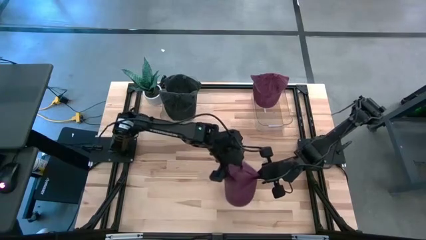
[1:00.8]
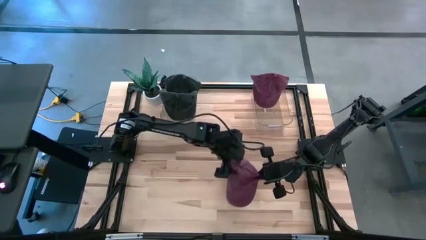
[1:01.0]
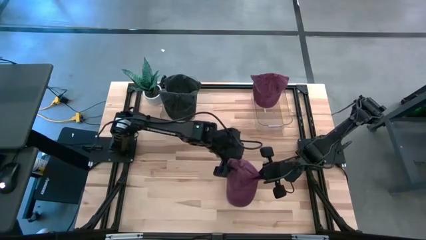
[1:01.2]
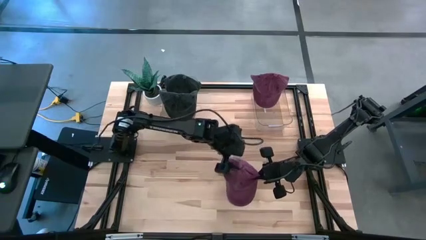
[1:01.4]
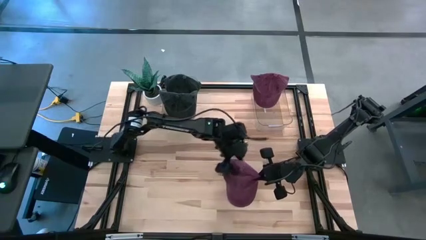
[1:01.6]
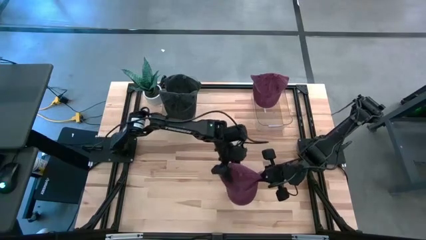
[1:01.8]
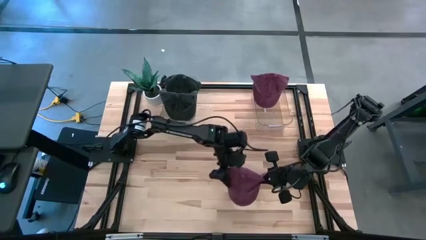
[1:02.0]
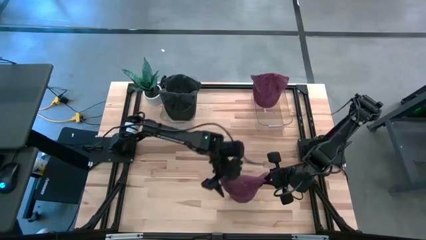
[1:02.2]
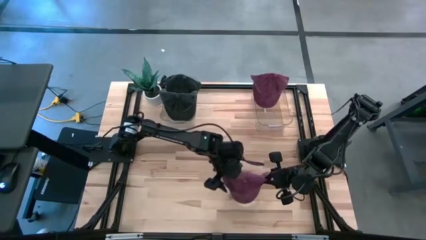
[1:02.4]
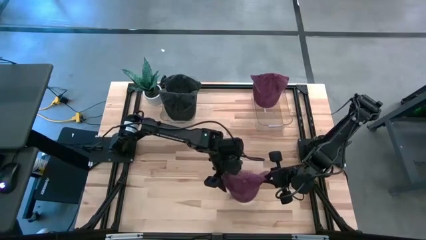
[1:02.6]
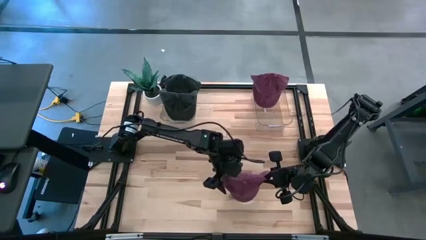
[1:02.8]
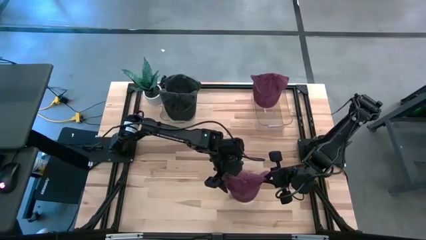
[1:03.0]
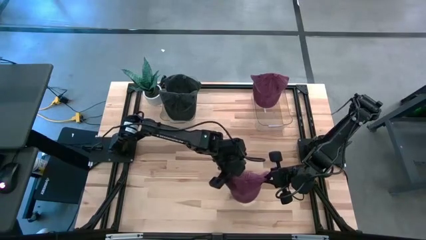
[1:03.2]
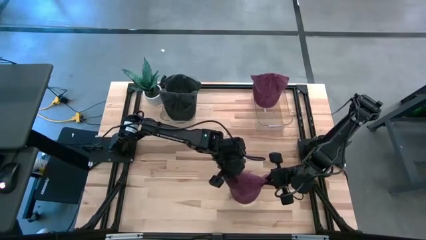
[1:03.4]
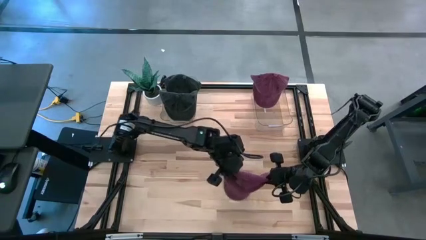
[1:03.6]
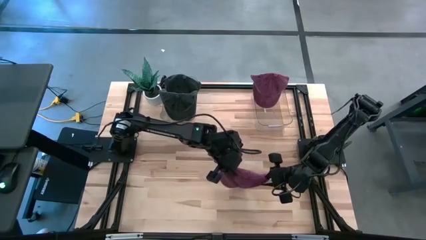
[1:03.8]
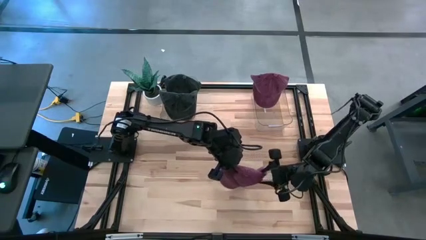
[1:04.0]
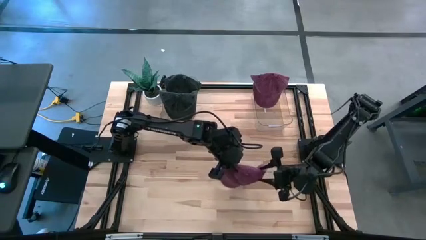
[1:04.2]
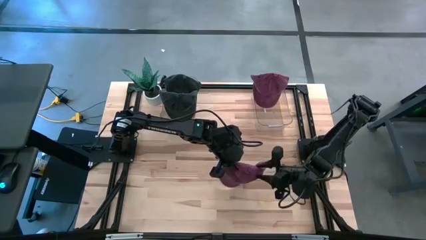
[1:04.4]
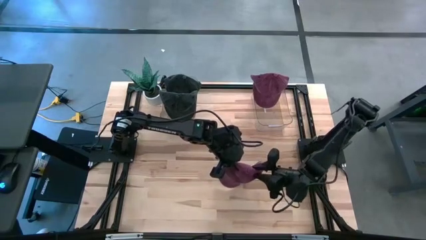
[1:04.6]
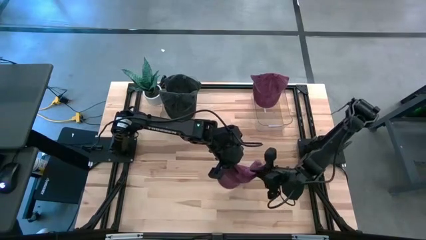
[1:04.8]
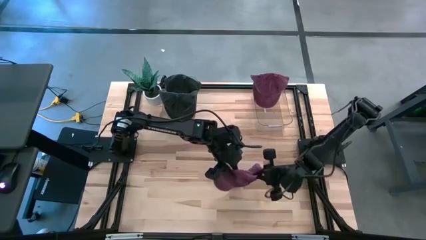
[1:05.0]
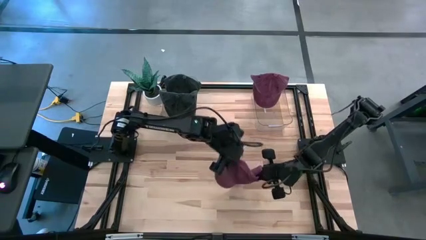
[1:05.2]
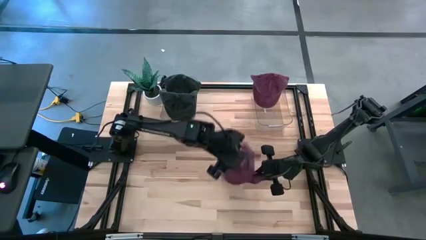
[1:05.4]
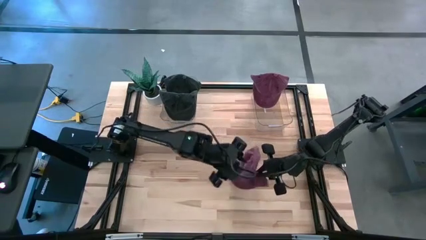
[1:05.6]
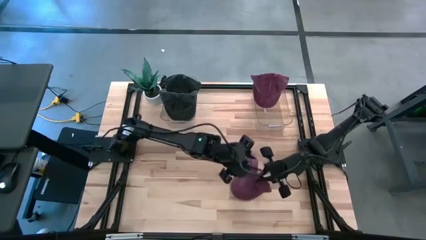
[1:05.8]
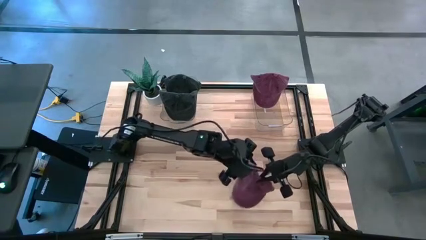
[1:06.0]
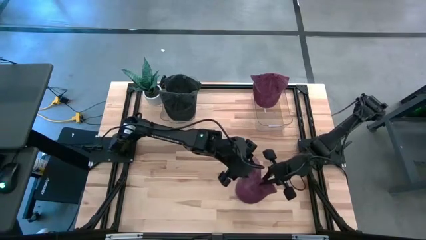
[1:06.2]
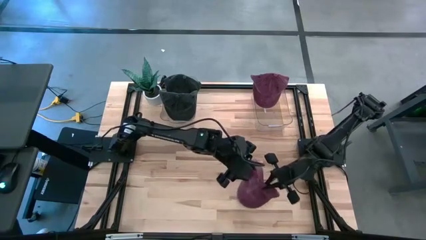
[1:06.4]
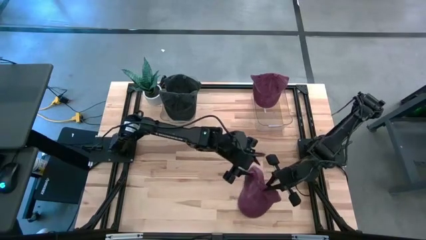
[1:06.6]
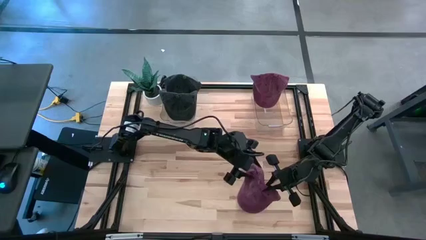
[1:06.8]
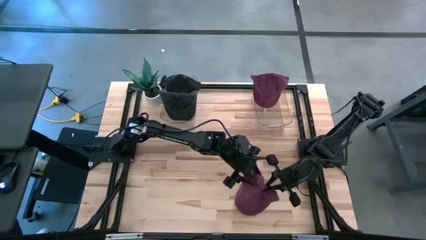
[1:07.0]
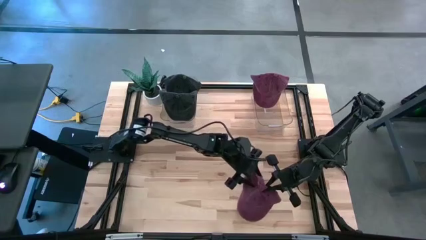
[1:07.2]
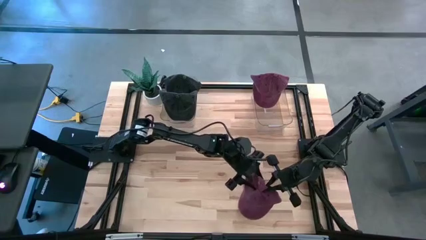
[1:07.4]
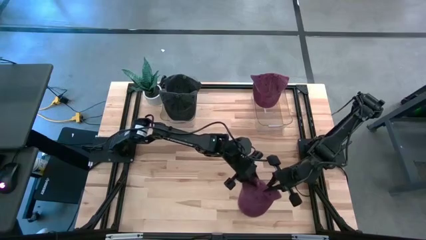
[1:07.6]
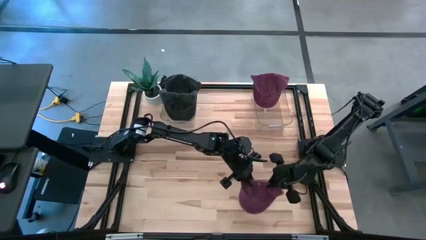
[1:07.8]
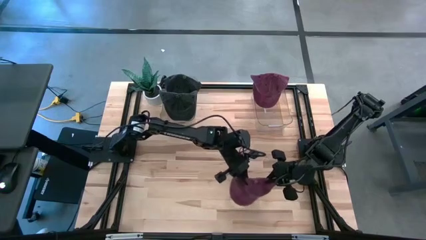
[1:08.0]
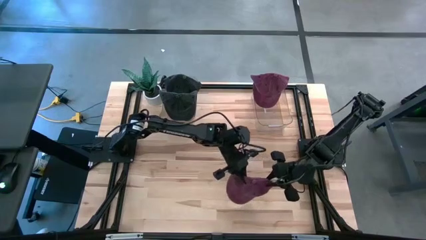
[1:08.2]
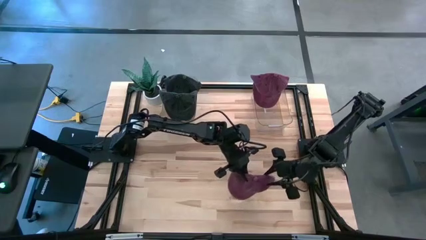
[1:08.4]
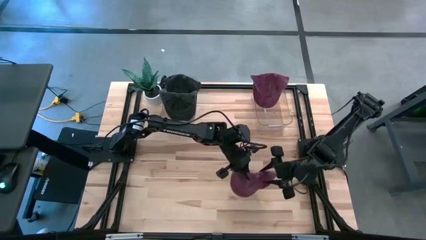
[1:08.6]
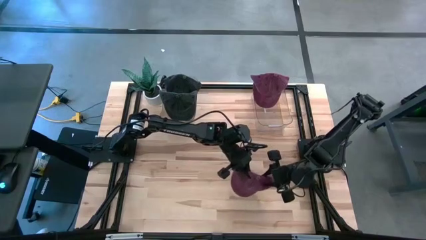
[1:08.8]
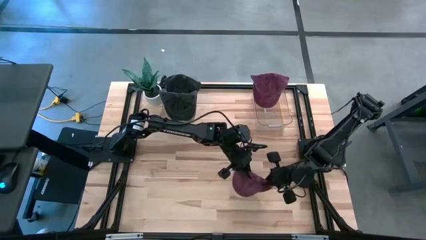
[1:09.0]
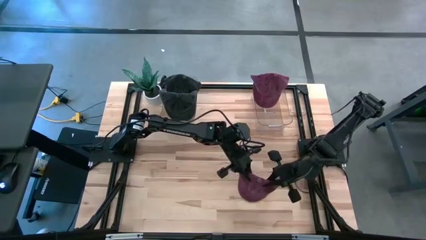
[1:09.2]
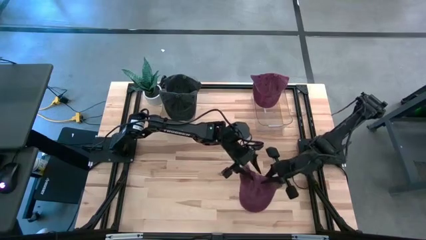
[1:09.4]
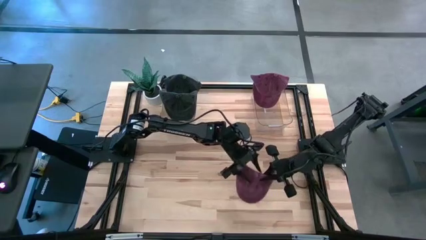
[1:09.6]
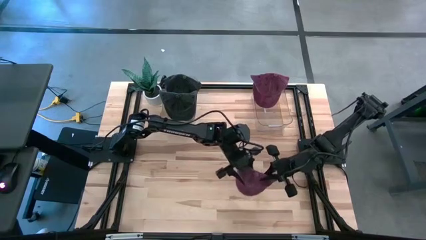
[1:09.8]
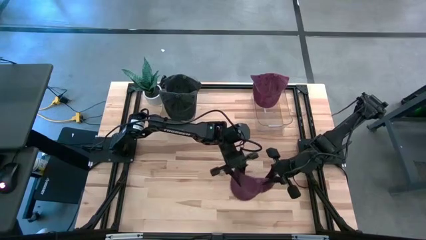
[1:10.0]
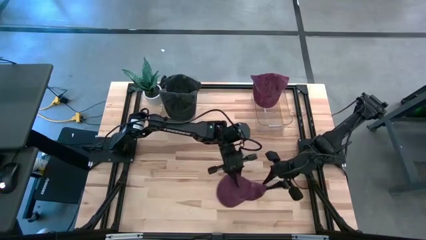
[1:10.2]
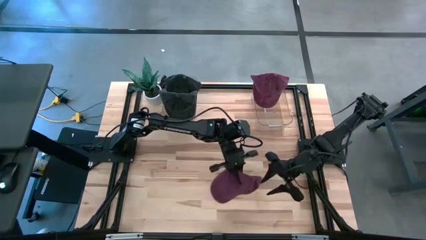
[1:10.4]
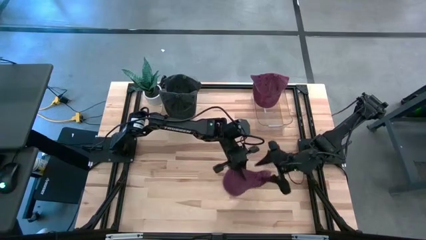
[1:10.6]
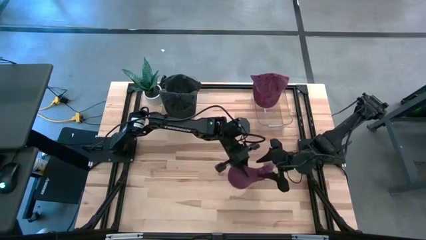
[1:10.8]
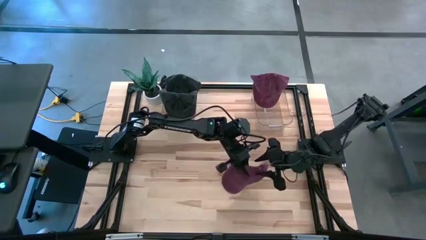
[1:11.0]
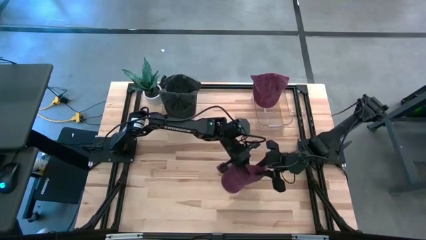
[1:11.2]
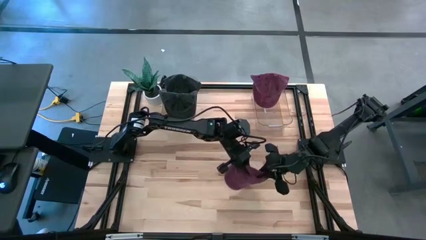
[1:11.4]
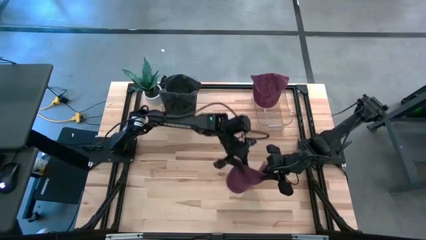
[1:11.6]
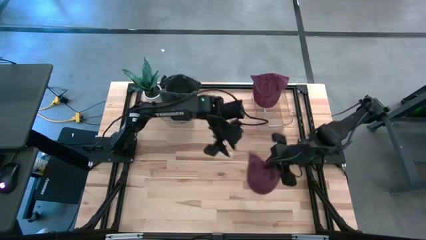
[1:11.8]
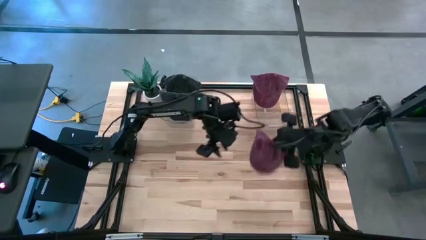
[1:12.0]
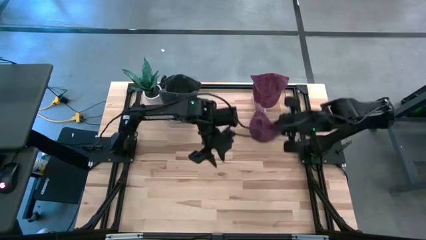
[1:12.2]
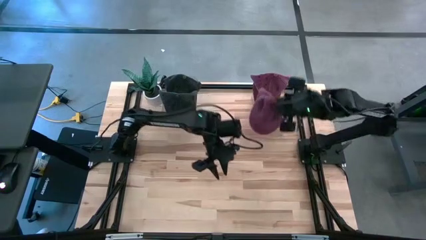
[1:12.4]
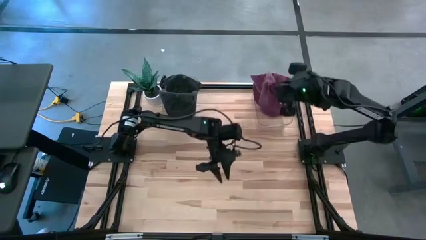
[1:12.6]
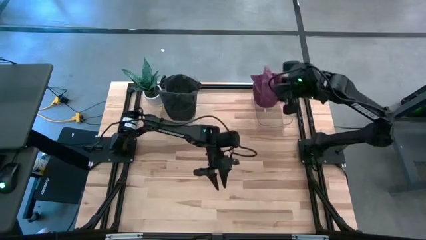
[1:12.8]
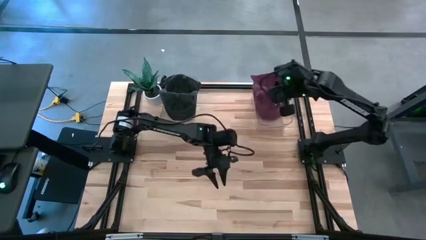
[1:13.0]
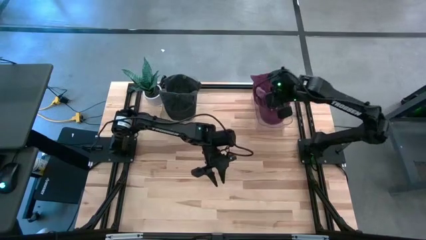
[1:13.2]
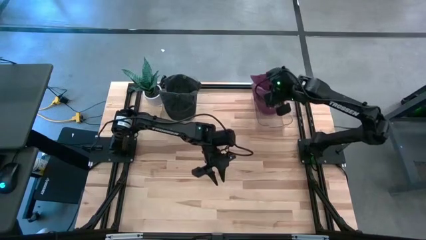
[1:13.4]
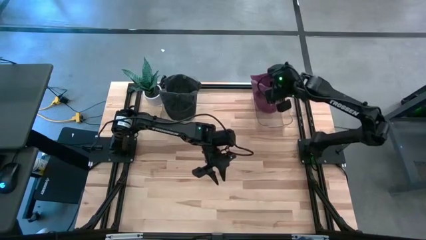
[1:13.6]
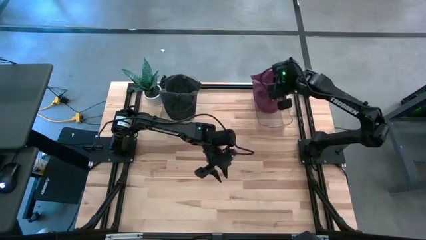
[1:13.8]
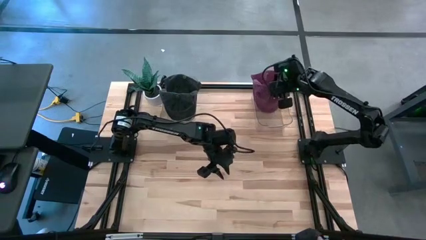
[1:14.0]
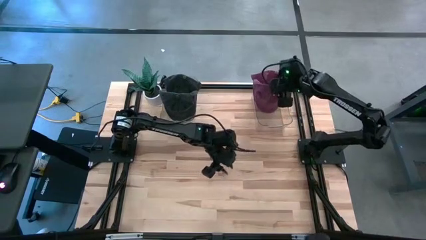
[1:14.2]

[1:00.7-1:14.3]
Task: Pick & Place hat
Put the red cap into the right transparent bin

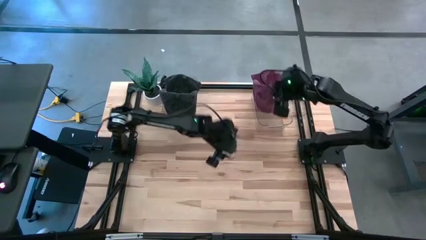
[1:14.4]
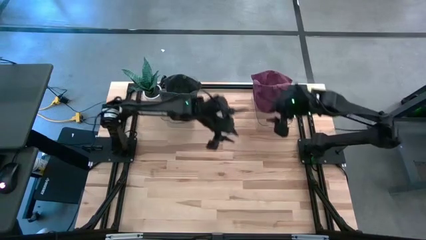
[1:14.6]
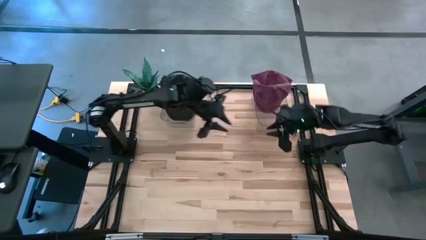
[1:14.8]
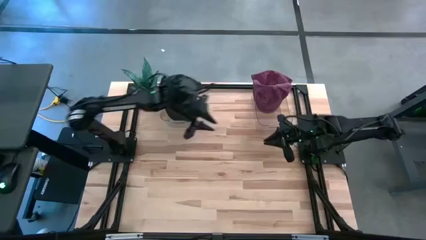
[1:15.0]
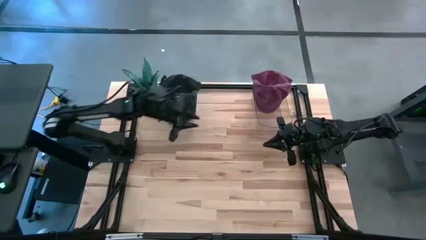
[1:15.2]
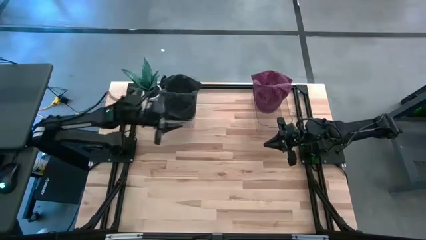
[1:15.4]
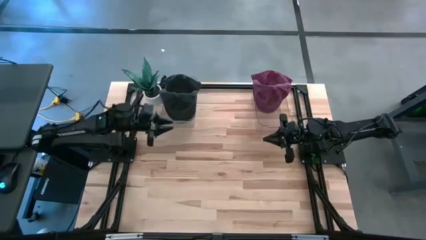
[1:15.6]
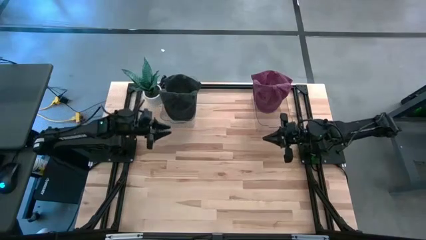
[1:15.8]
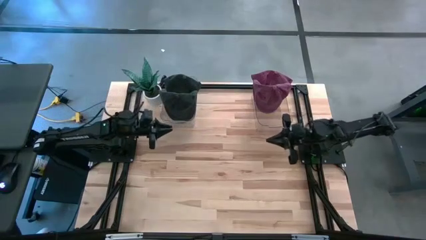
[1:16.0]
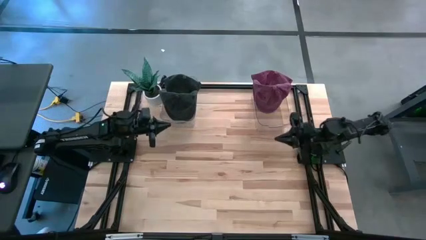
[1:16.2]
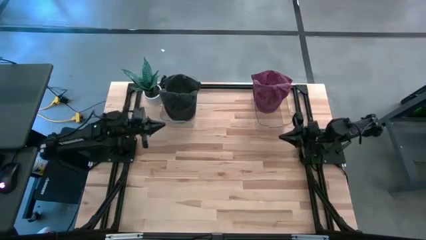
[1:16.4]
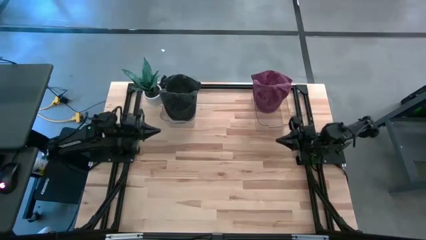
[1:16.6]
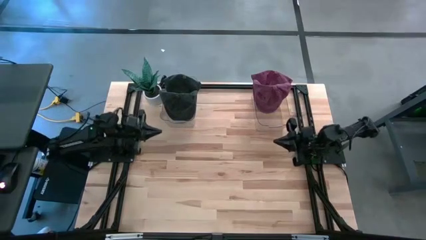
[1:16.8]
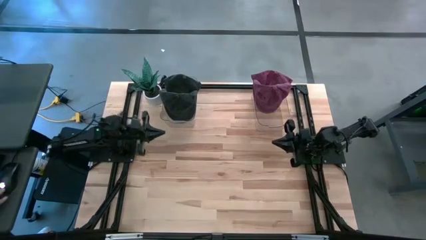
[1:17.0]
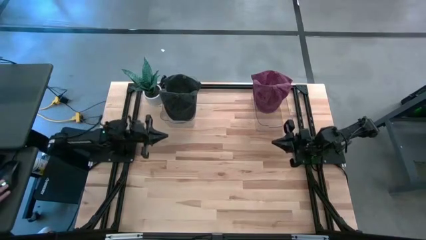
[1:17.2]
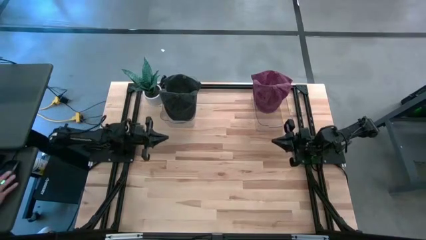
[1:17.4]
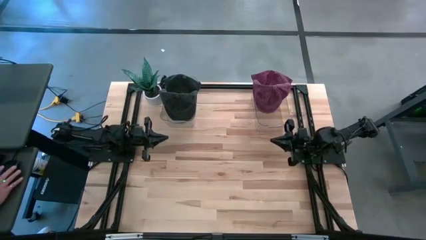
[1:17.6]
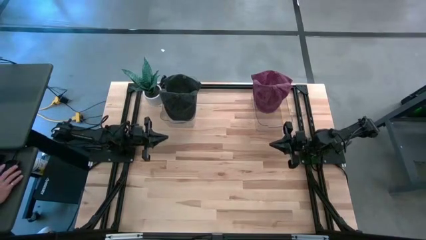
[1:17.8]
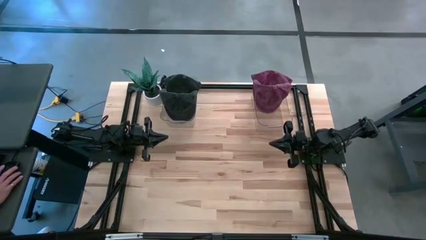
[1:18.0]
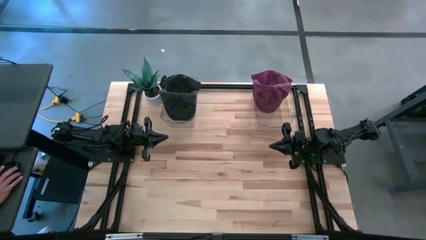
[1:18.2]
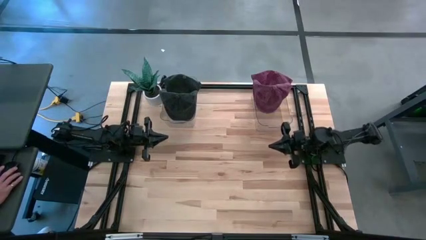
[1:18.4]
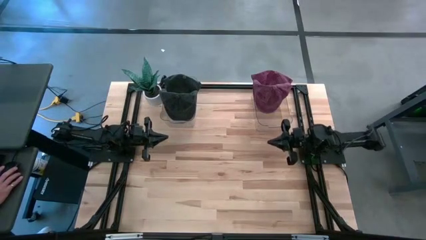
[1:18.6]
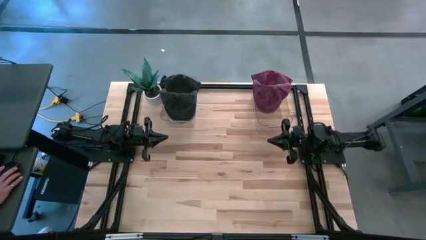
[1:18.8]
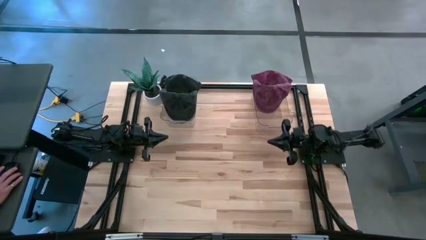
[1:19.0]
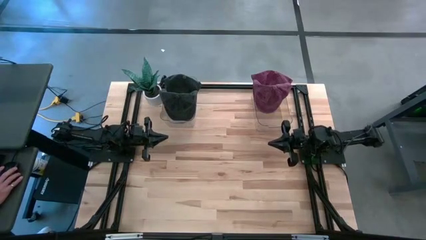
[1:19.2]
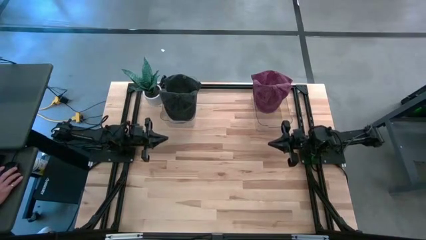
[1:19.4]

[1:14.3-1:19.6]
Return to Home Position
